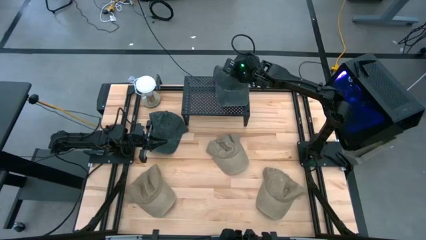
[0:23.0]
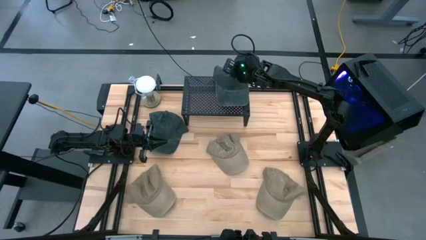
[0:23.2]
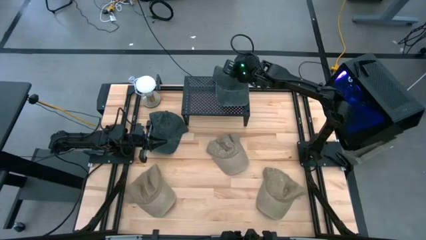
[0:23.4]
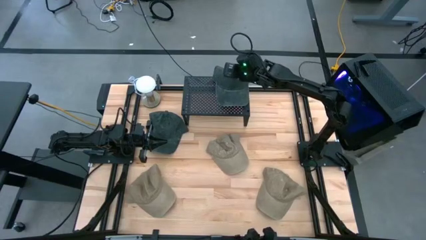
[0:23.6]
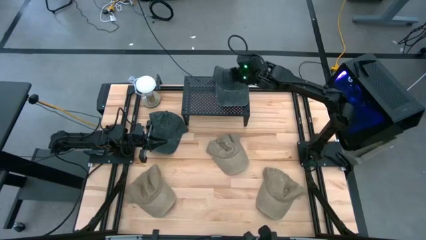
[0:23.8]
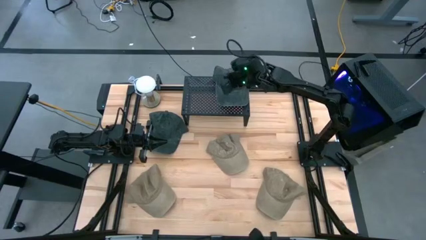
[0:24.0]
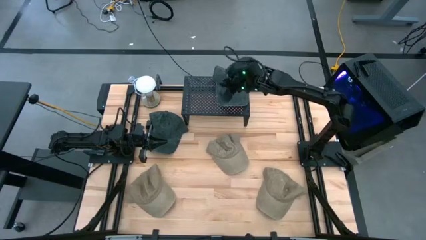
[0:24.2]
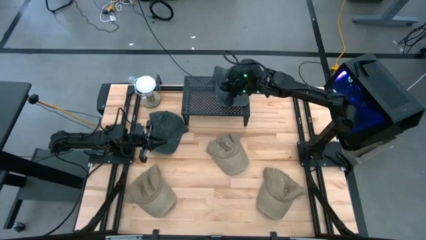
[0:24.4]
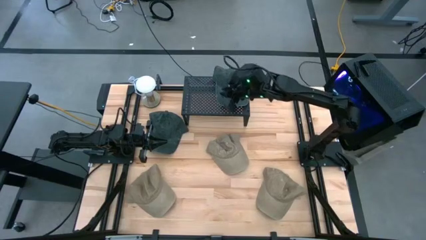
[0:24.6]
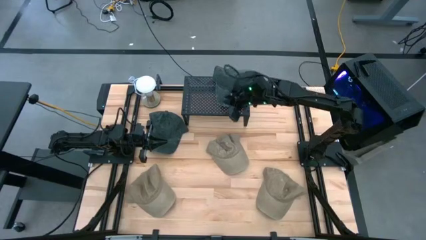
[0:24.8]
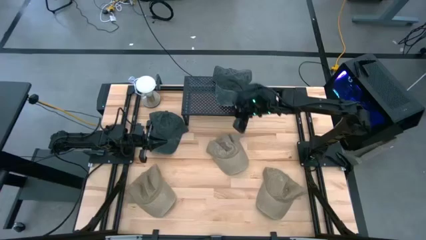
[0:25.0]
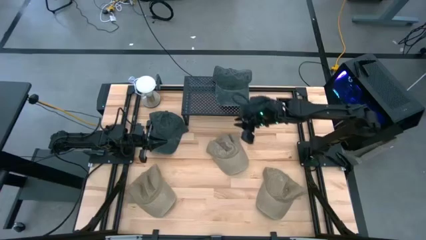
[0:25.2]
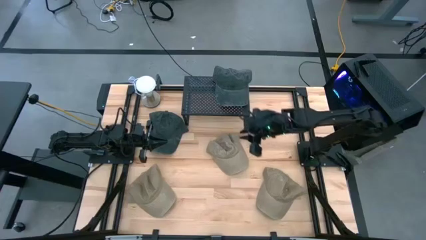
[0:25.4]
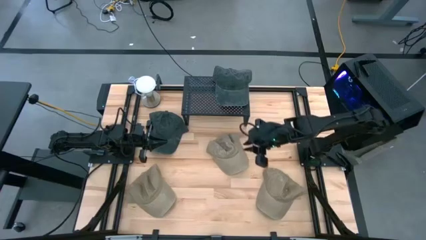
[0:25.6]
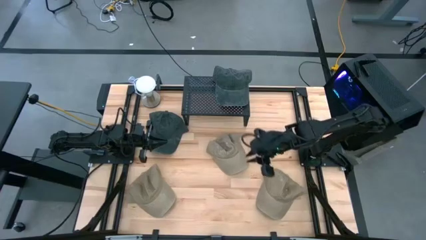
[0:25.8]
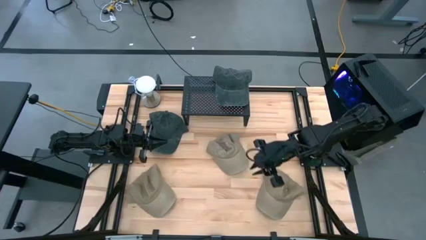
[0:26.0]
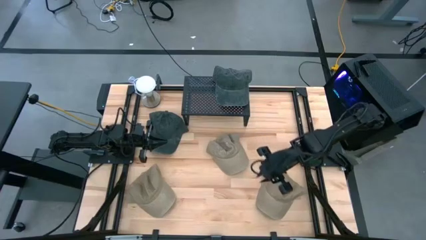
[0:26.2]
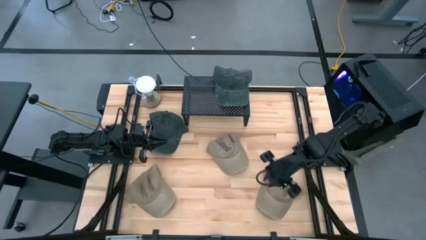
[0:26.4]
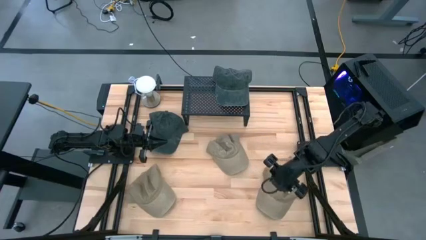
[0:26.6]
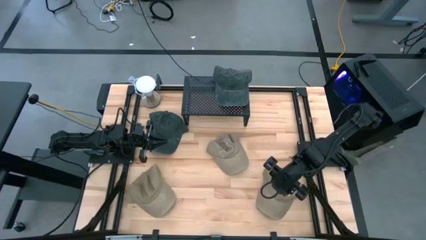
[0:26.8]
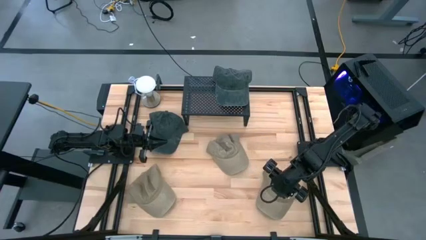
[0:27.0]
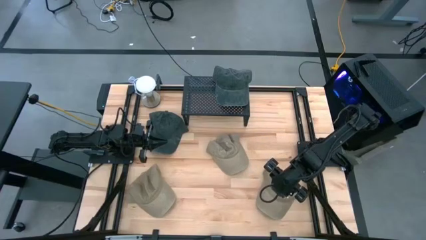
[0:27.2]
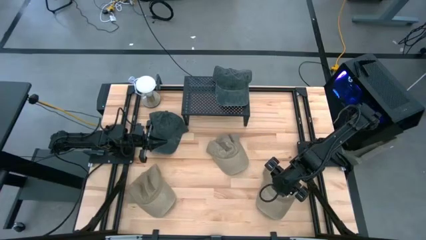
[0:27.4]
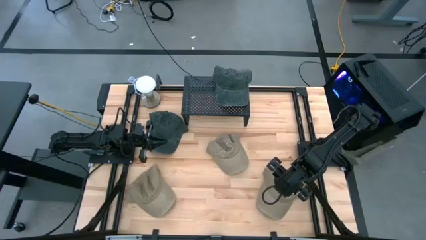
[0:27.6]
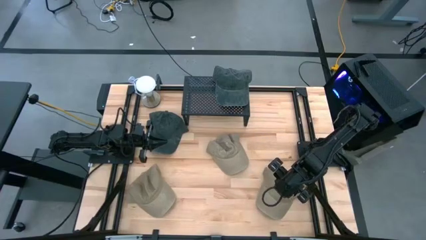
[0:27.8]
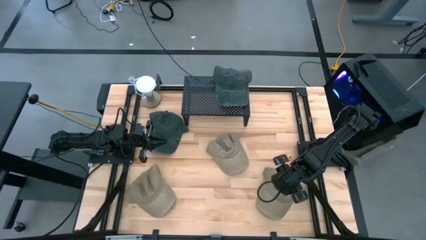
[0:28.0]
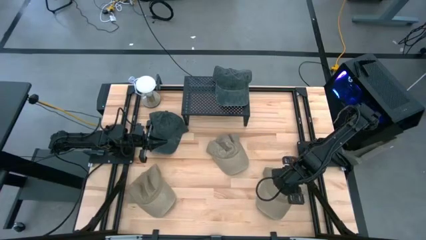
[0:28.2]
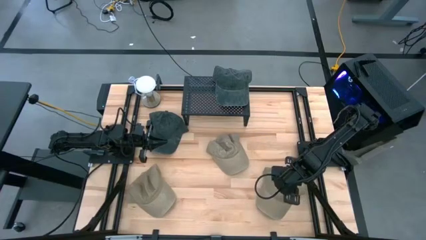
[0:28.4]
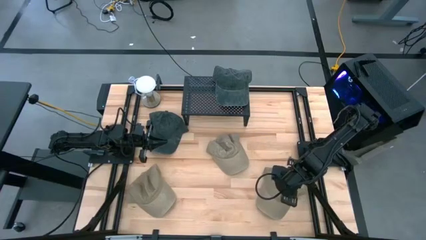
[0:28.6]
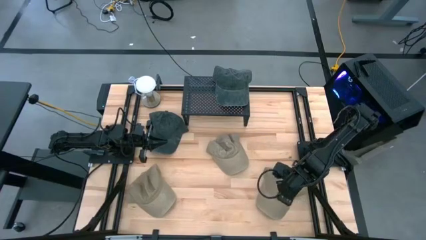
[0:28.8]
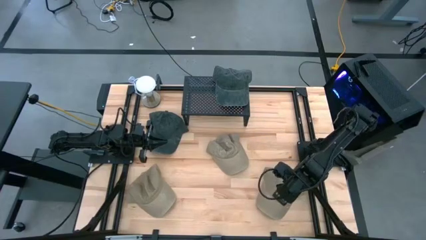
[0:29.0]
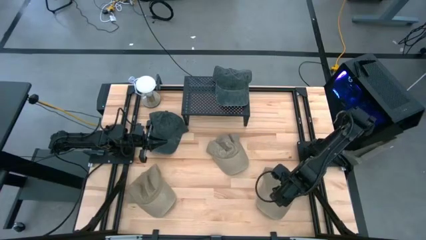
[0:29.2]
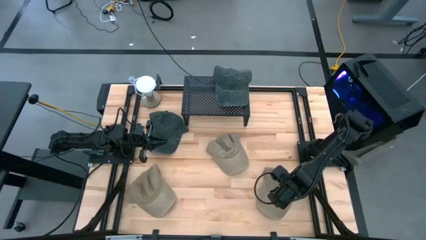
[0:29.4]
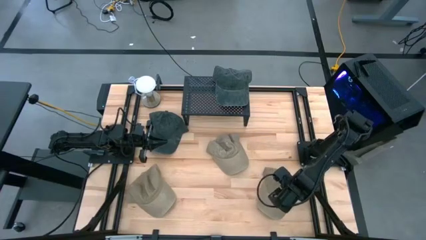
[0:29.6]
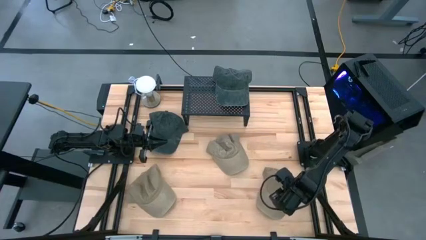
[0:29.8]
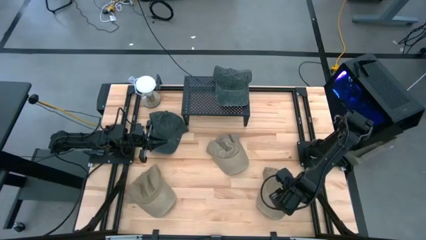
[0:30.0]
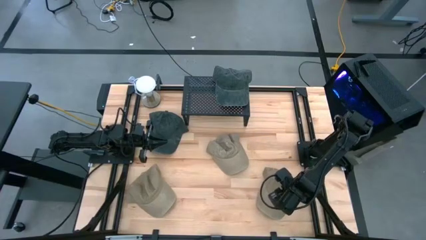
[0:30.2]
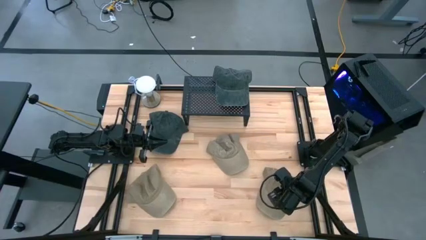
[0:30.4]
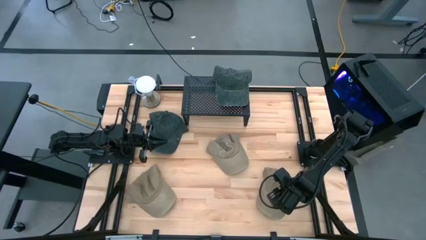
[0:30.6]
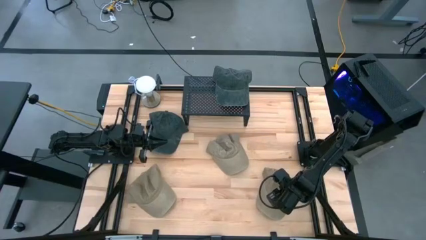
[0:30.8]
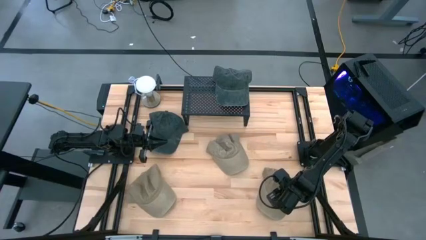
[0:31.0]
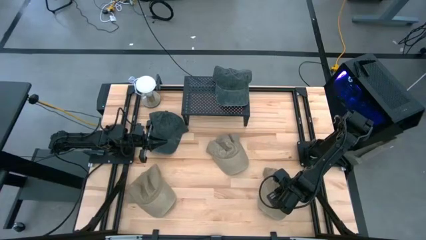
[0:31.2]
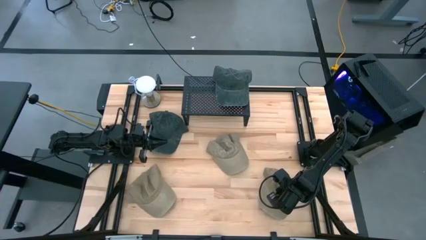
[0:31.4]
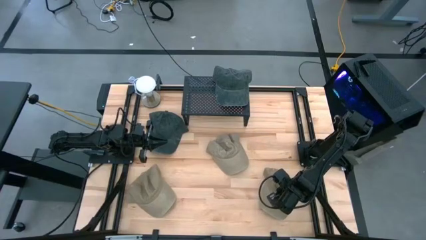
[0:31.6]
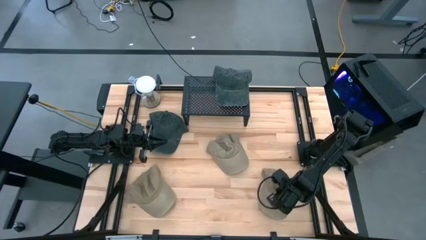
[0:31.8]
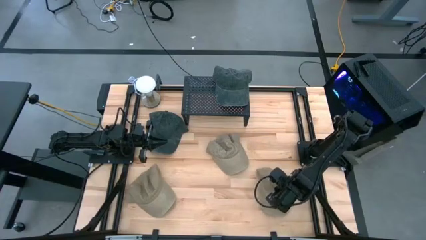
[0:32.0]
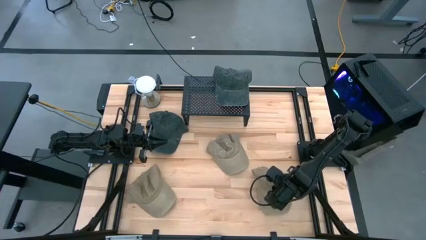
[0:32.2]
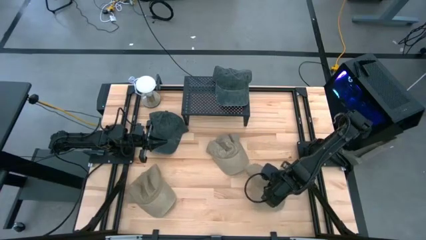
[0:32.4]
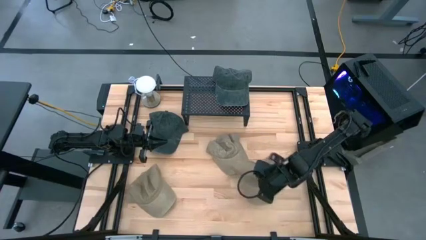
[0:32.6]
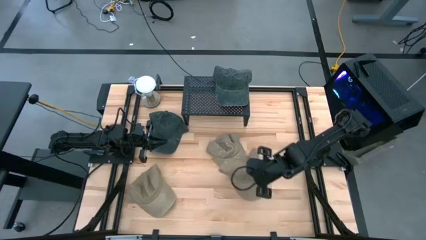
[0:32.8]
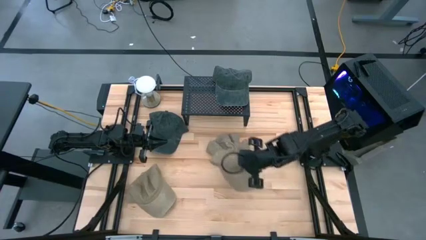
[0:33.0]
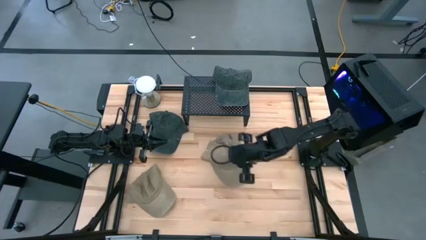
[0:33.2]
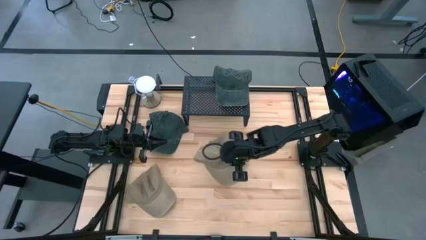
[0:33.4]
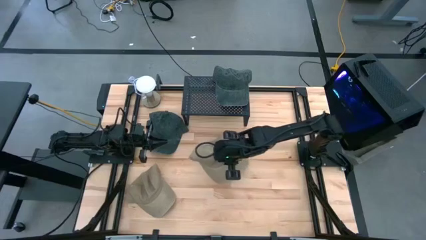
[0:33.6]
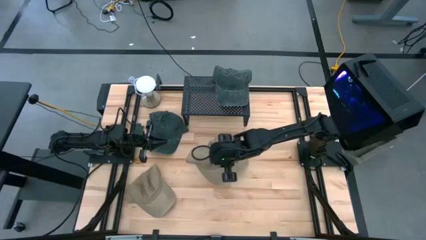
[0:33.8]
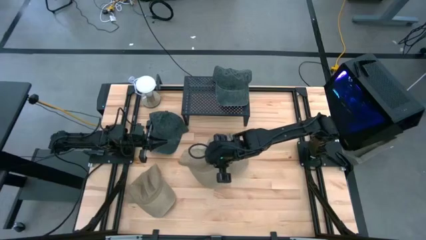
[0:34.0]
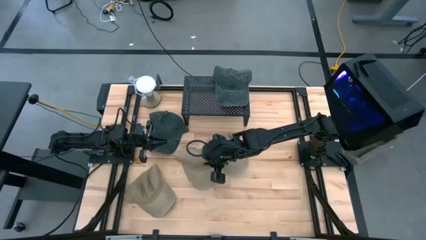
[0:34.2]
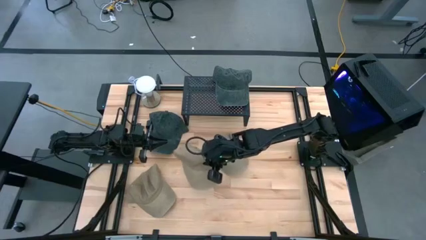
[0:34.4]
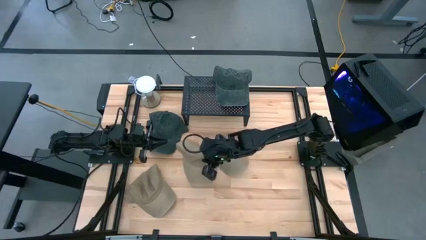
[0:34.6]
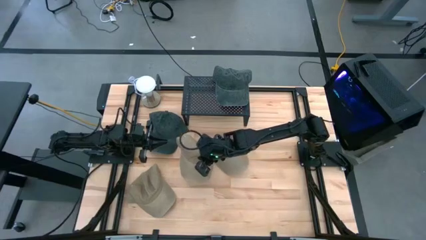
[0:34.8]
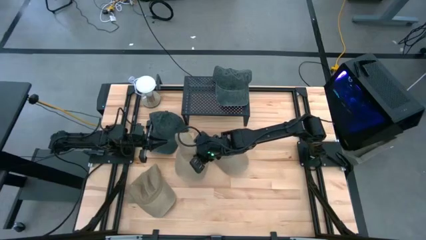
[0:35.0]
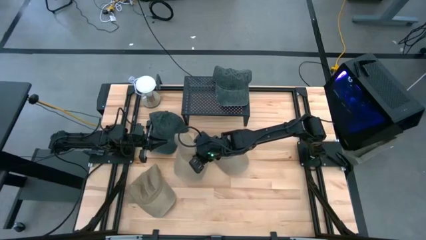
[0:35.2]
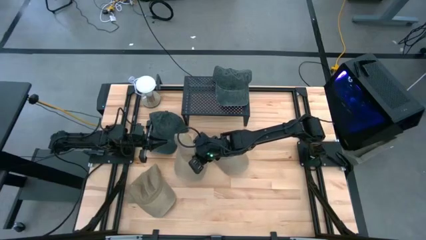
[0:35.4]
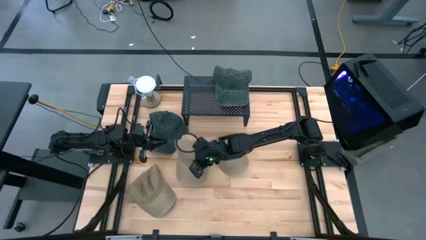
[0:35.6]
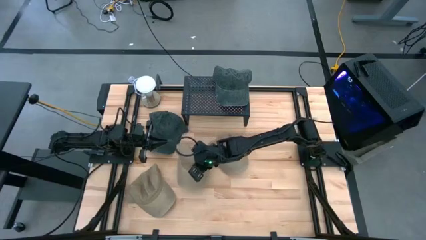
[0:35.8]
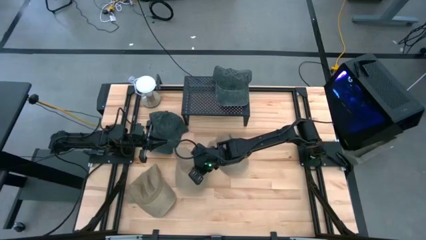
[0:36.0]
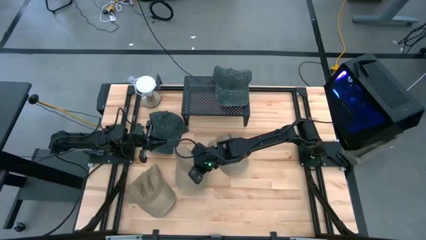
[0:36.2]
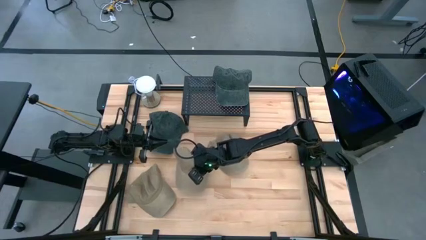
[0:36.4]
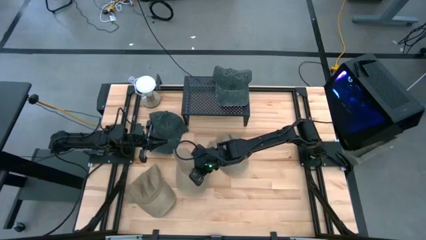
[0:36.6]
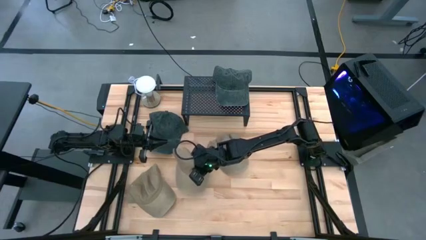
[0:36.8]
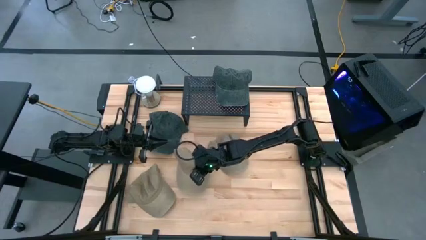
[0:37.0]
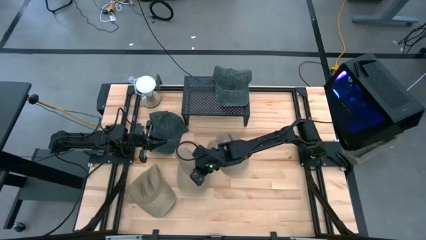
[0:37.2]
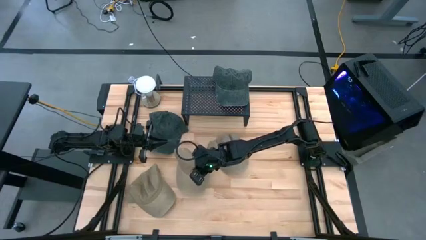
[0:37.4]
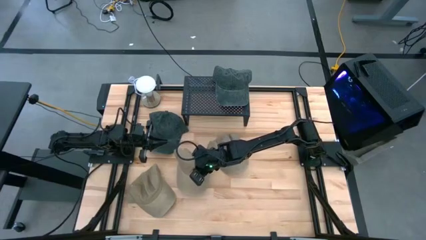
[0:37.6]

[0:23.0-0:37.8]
Task: Pick & Place hat
Move the bottom right brown cap to the right side of the bottom left brown cap
